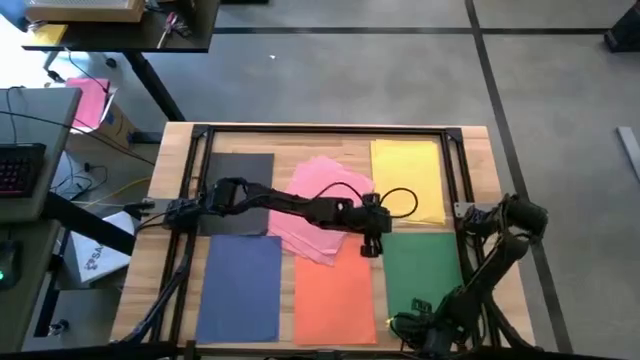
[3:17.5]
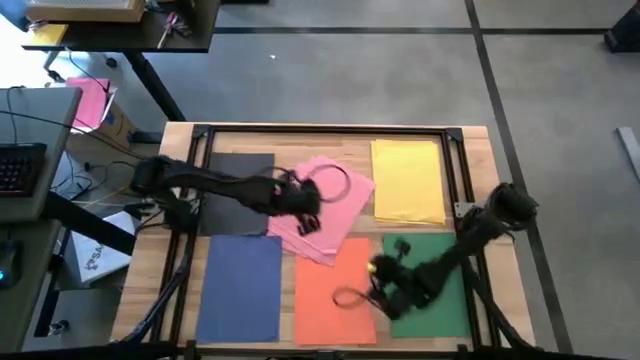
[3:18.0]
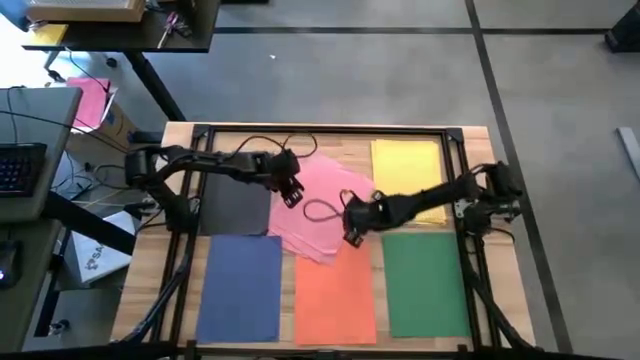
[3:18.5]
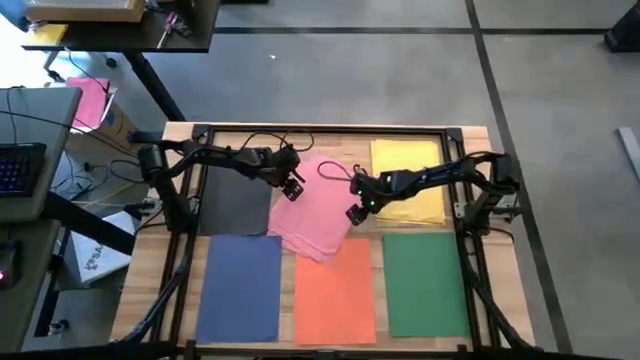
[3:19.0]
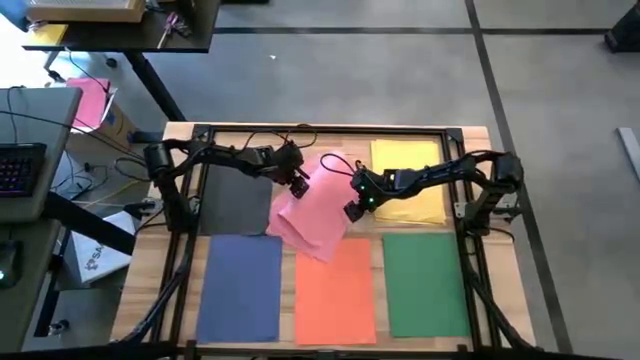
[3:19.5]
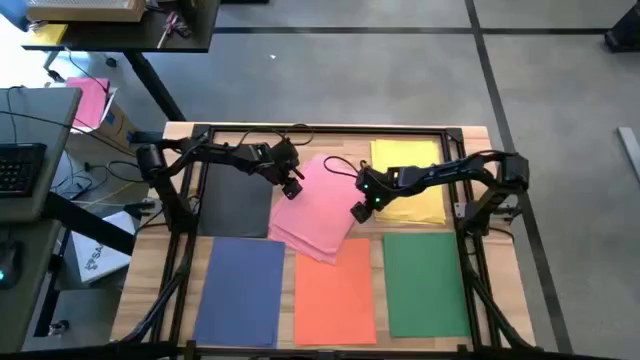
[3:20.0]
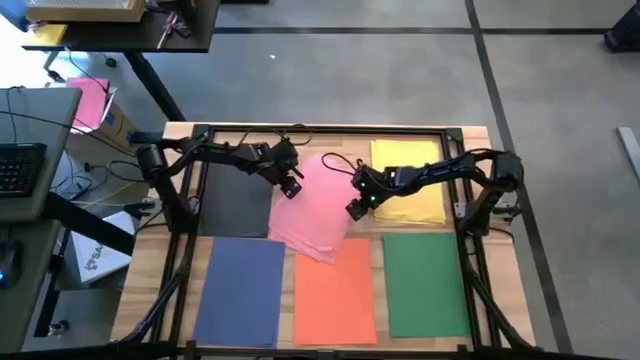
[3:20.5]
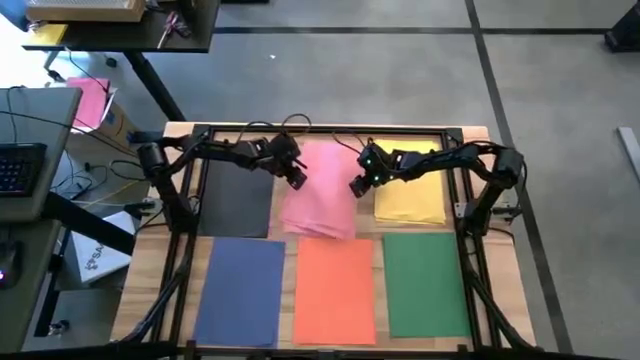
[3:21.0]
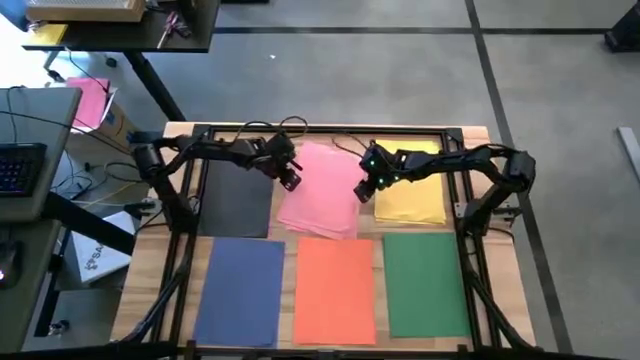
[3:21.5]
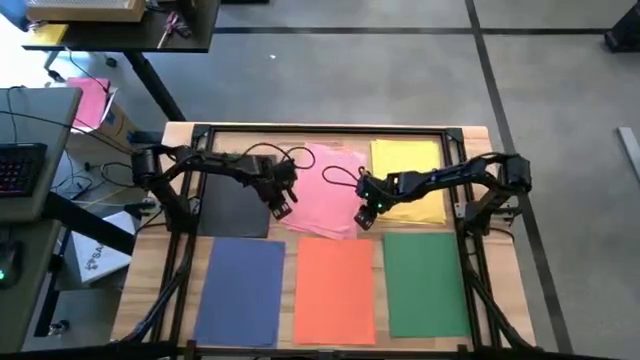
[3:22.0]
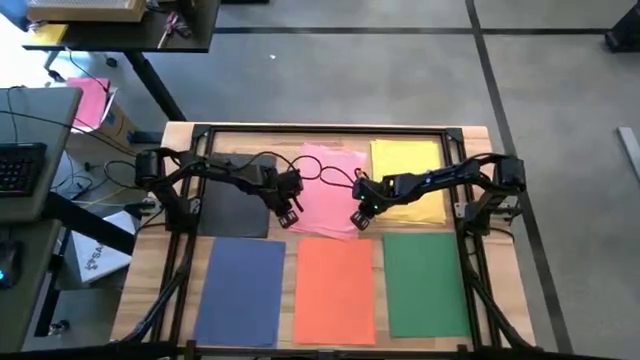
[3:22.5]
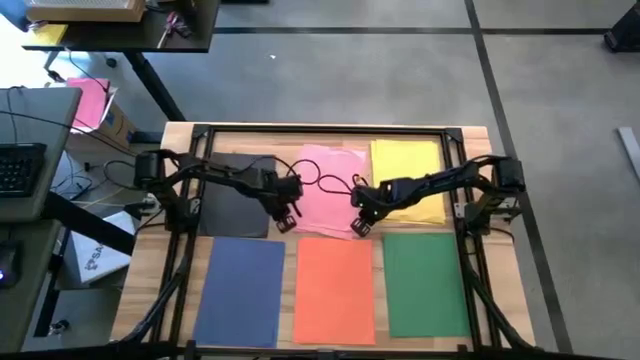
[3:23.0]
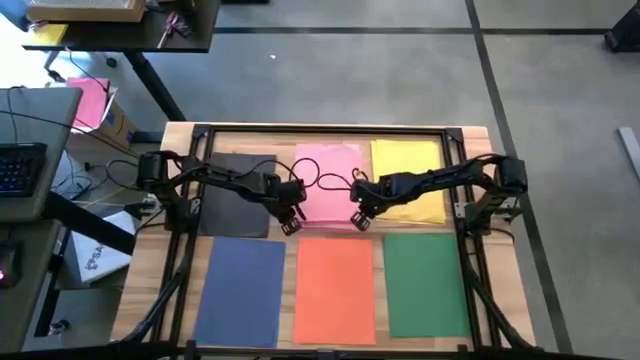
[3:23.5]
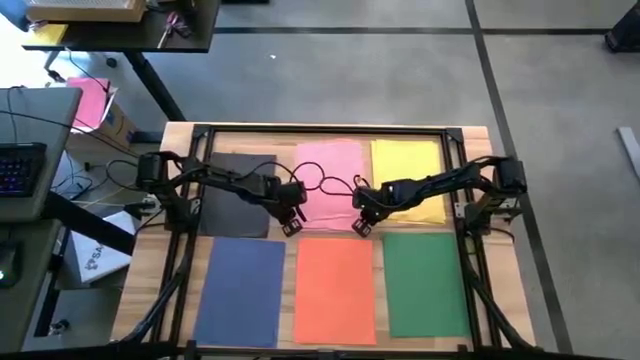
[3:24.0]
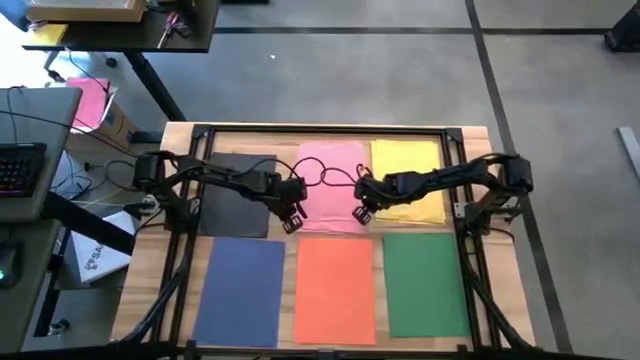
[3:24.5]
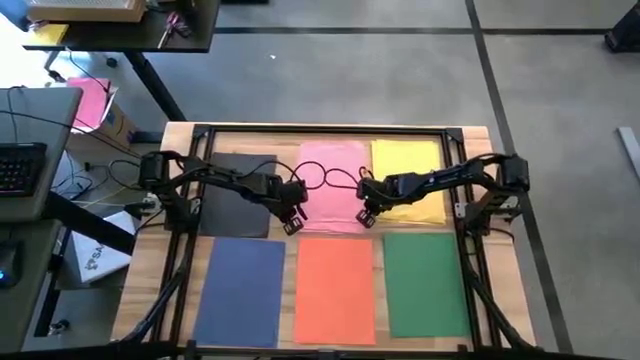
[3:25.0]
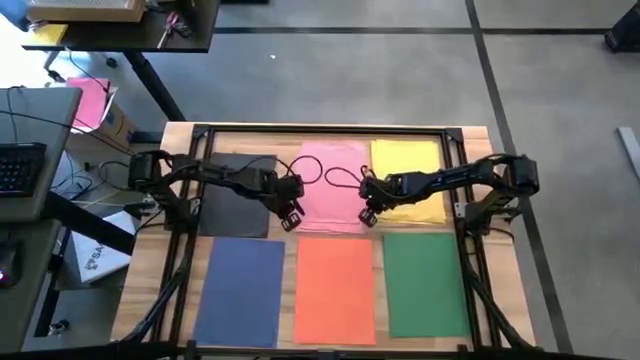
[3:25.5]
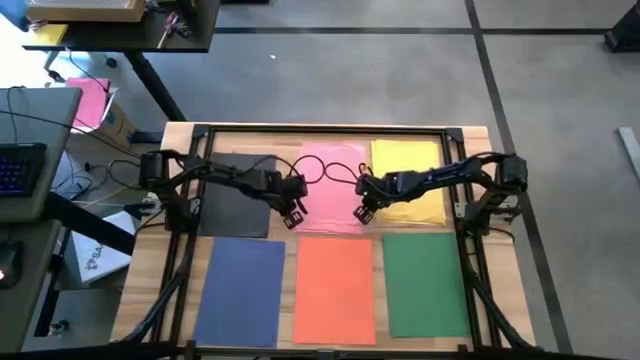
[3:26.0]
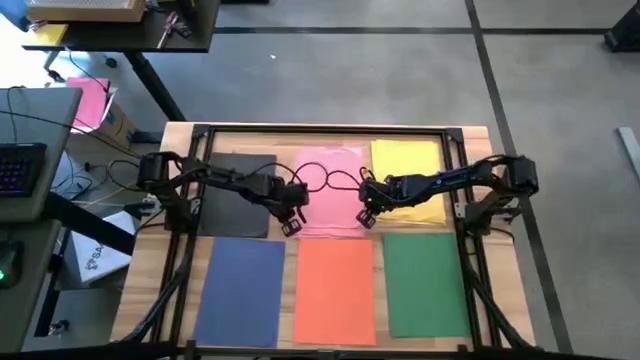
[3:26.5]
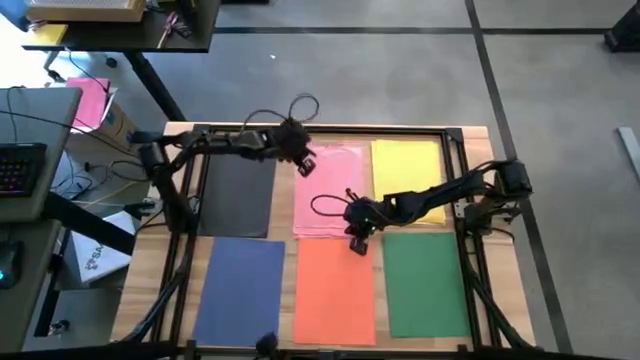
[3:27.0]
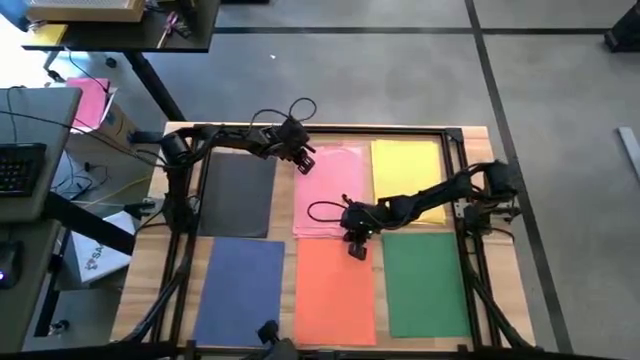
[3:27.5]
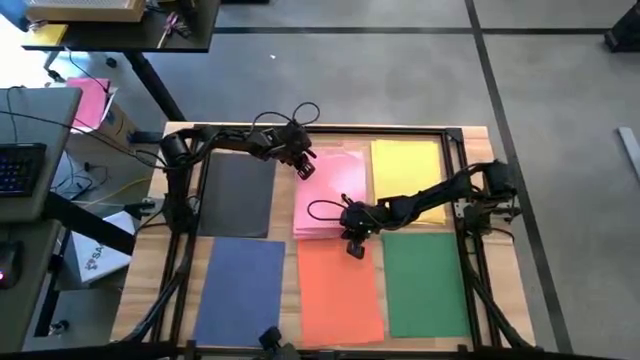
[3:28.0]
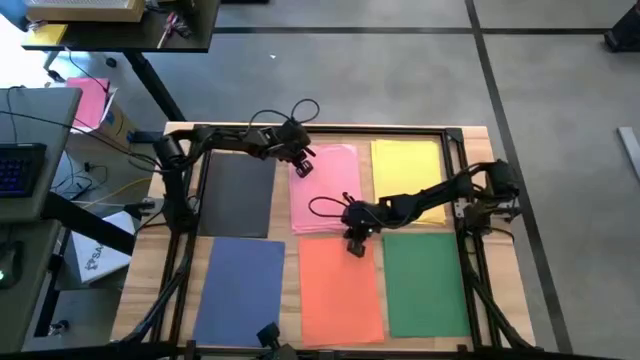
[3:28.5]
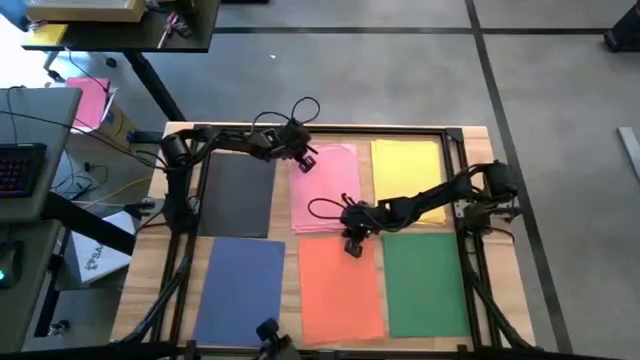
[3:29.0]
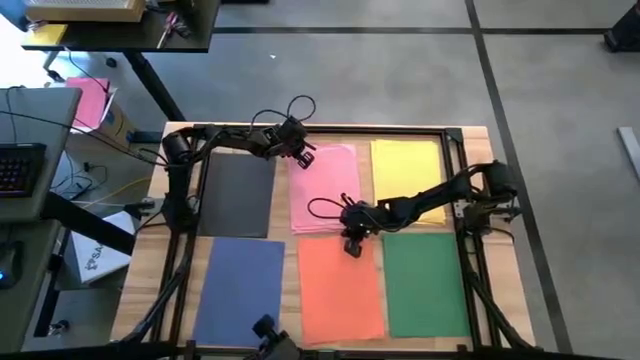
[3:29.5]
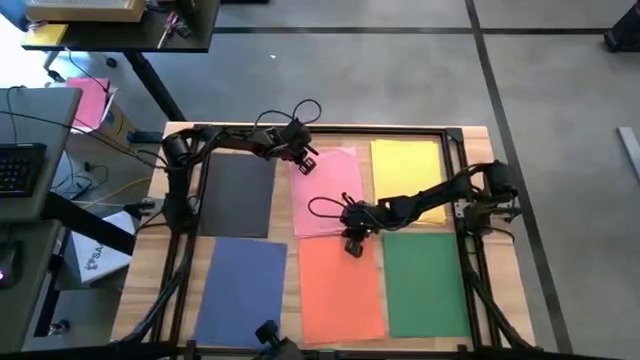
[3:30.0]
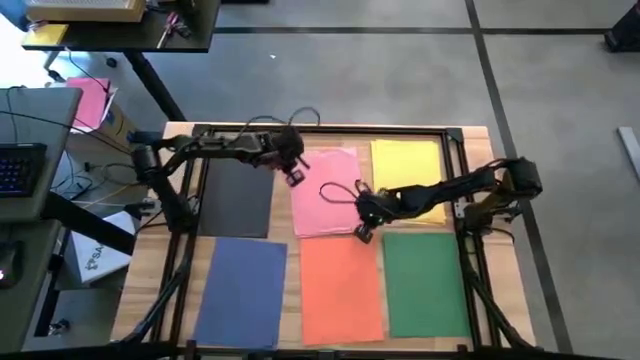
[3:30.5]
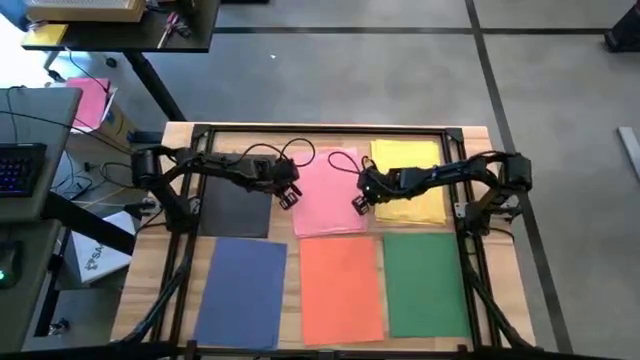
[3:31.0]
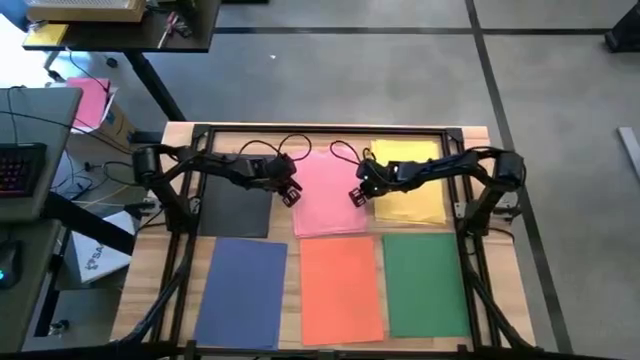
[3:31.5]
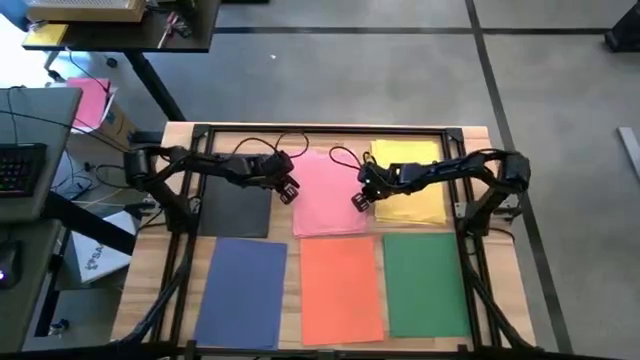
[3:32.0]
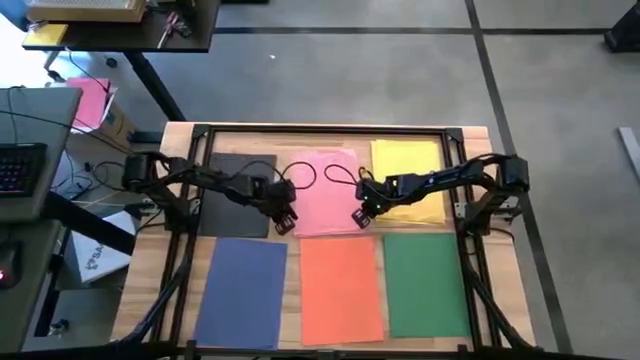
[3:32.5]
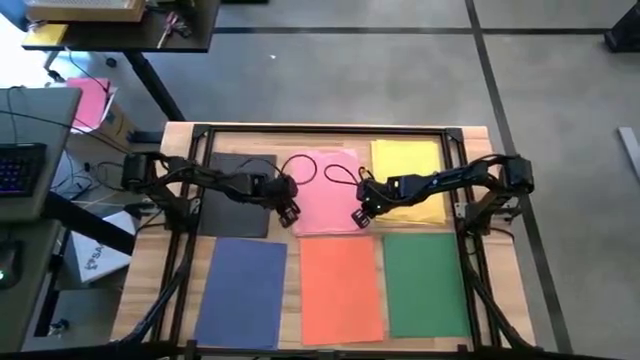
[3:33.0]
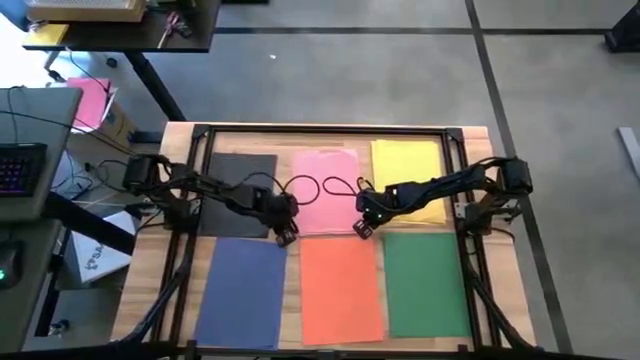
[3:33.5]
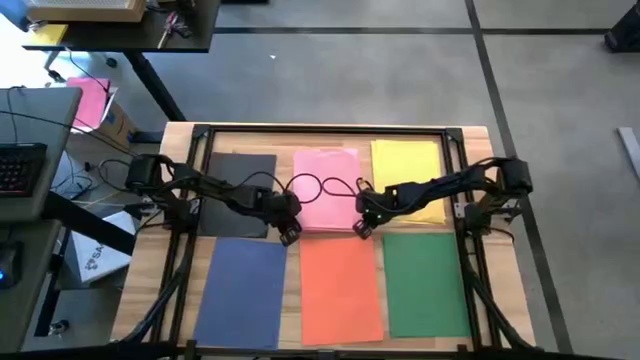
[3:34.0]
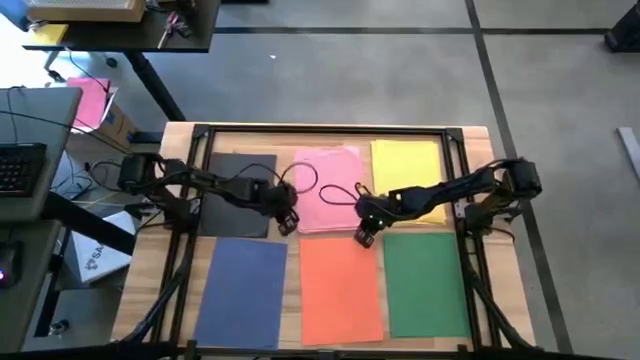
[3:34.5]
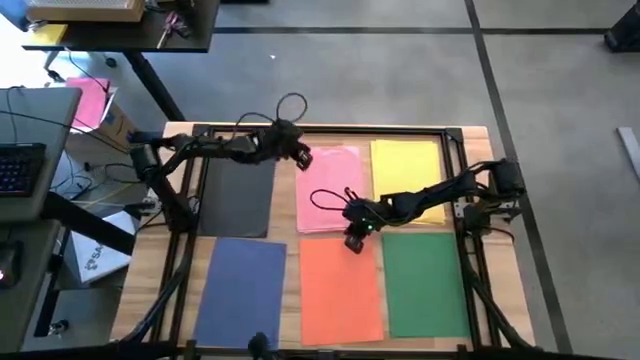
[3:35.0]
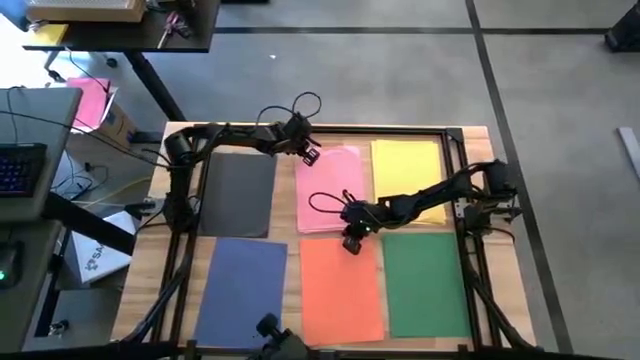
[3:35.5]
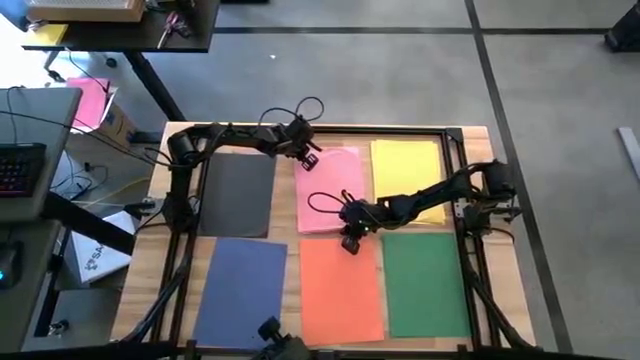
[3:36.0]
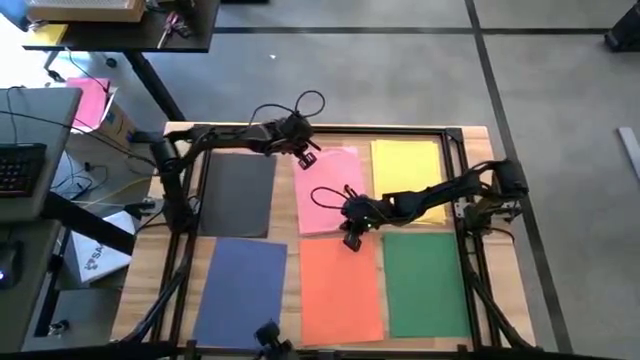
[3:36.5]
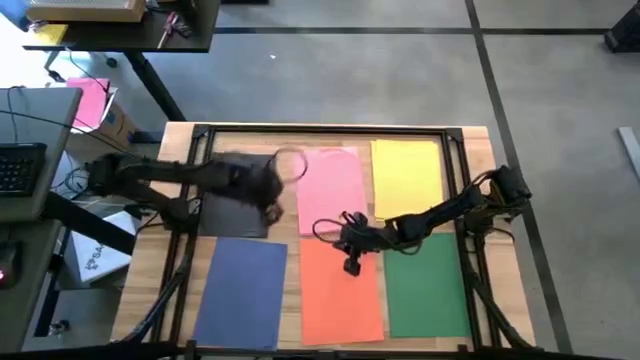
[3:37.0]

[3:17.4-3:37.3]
Task: Organize paper
Adjust the colored papers

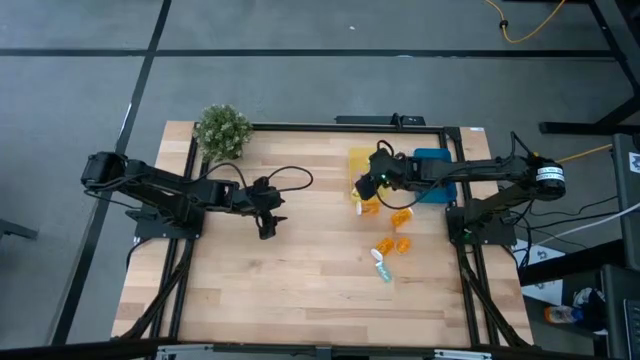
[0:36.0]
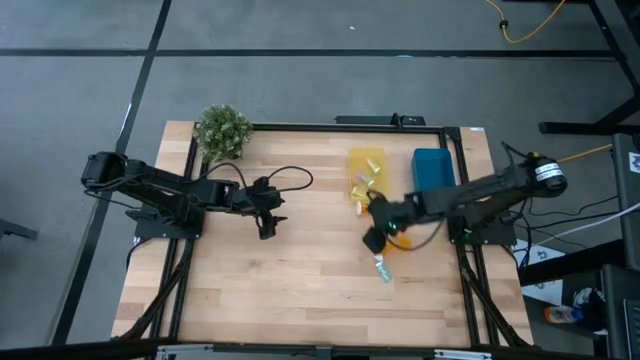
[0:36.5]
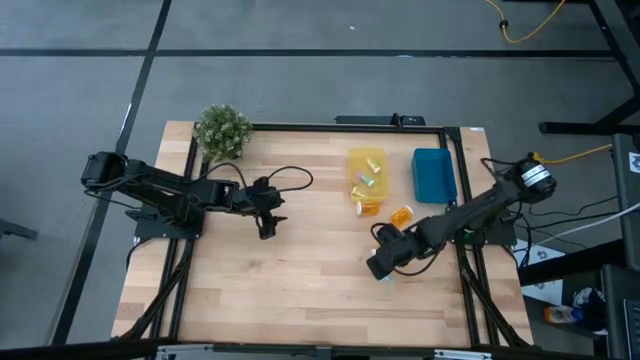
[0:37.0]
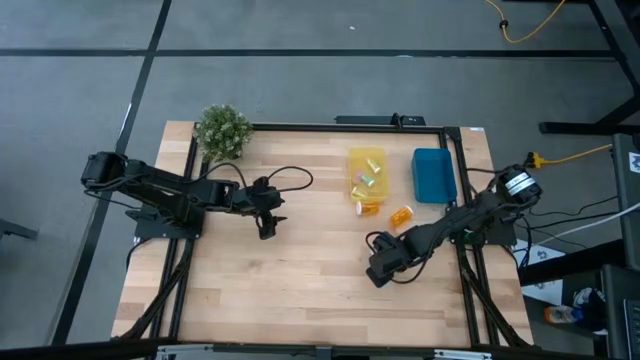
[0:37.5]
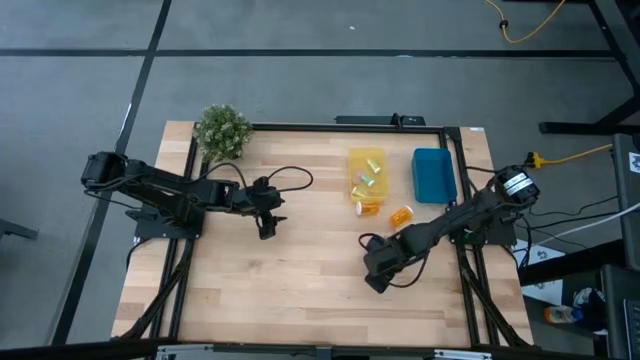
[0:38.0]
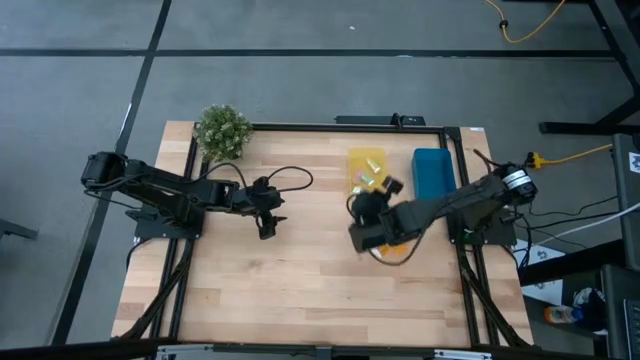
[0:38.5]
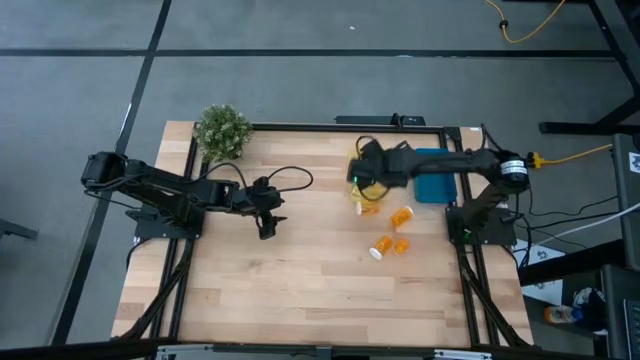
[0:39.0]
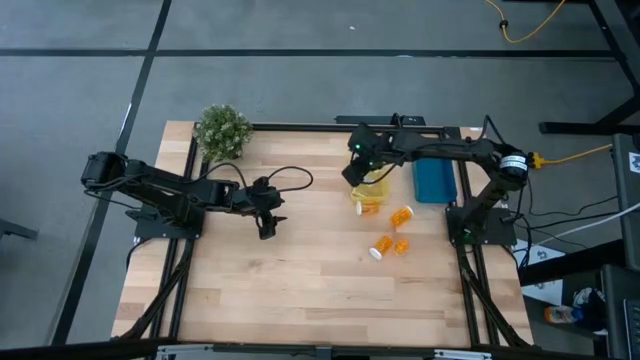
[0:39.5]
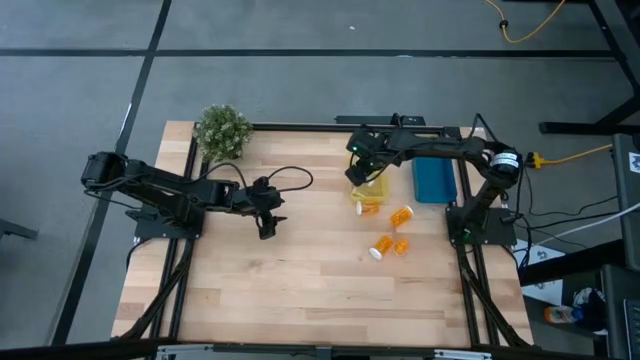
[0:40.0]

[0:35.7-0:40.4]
Task: Pick and place medicine bottles into bin by pill shape (circle, oval)
Put the small blue pill bottle into the yellow bin
